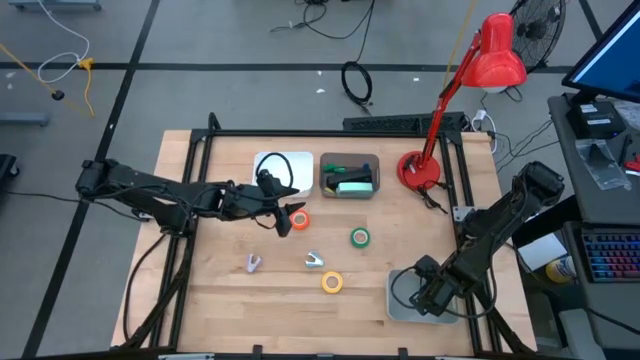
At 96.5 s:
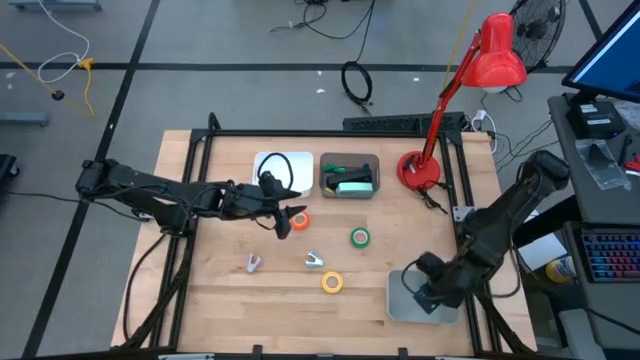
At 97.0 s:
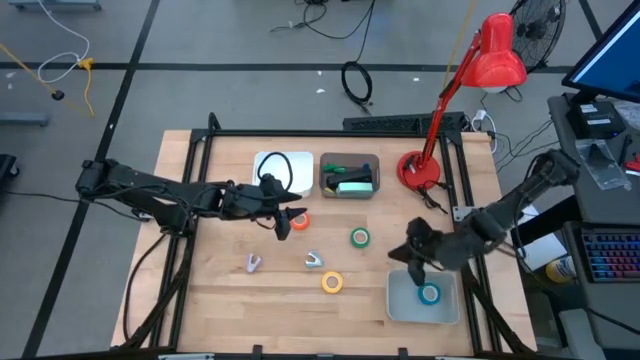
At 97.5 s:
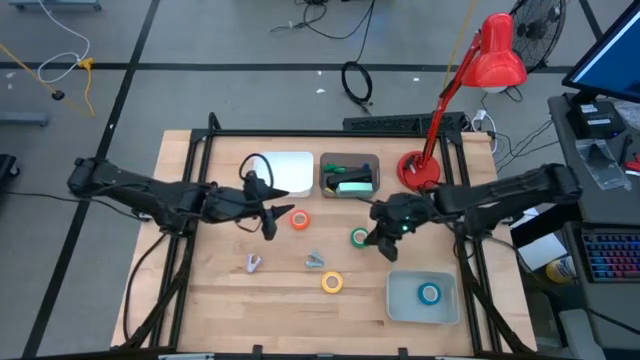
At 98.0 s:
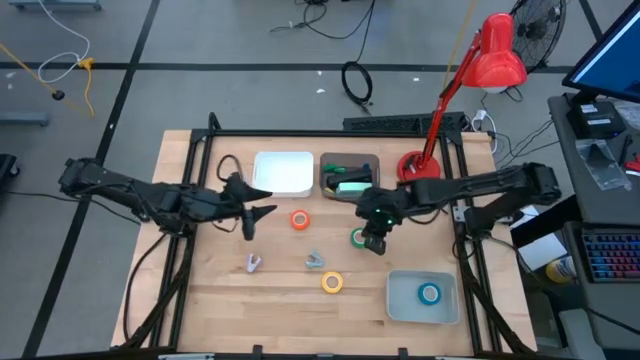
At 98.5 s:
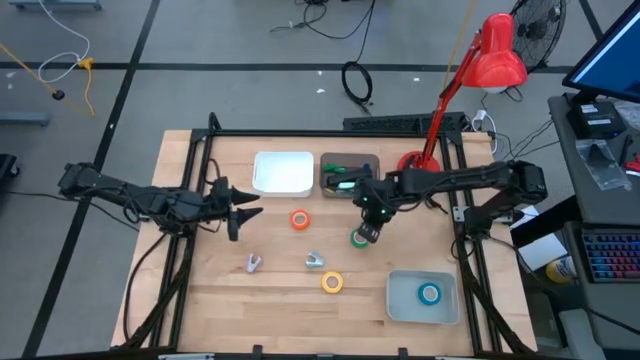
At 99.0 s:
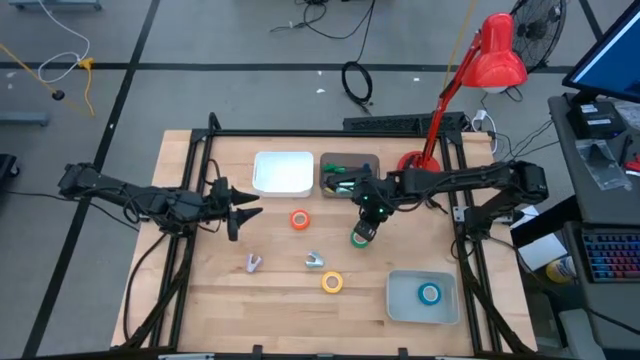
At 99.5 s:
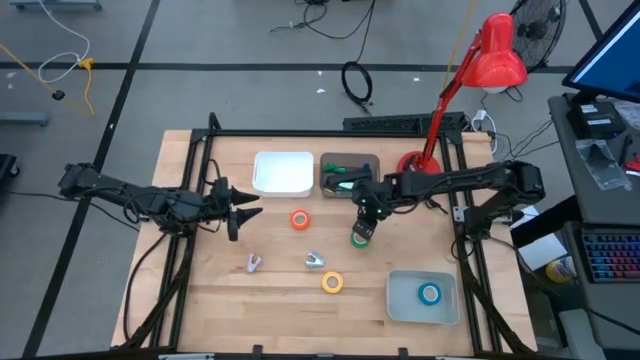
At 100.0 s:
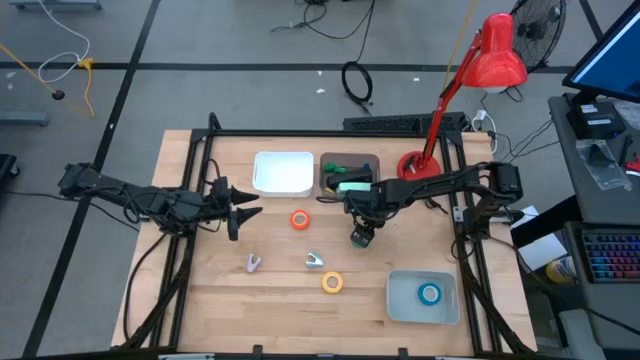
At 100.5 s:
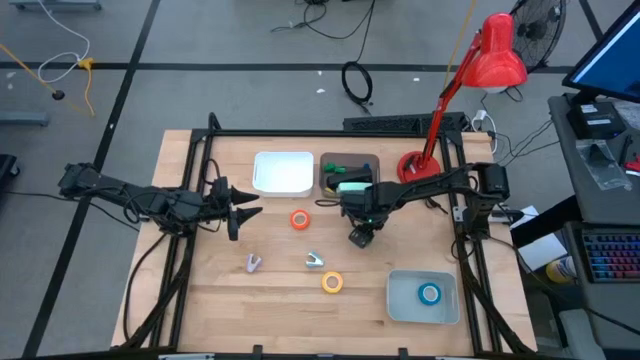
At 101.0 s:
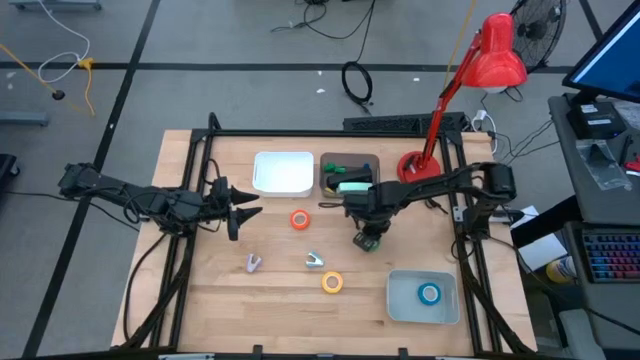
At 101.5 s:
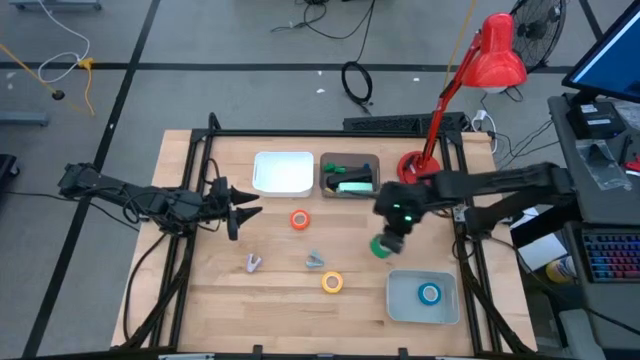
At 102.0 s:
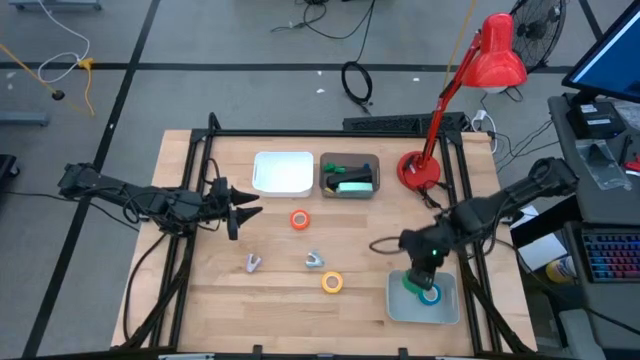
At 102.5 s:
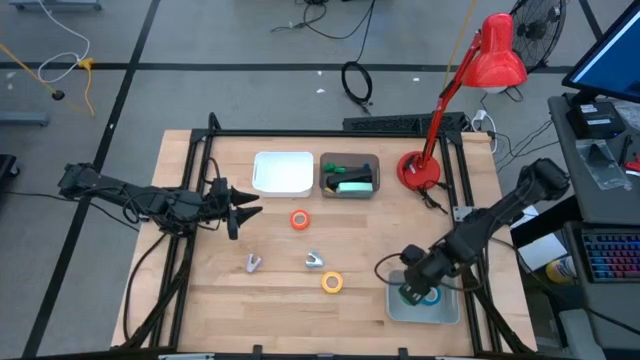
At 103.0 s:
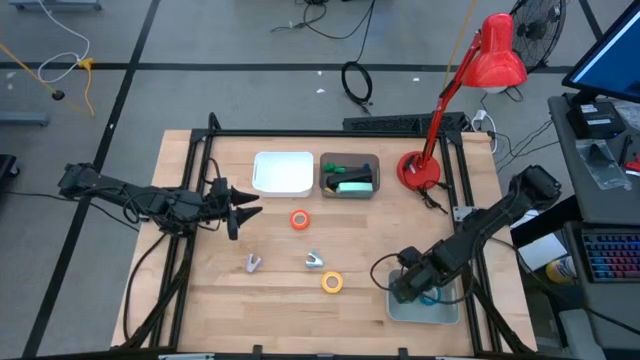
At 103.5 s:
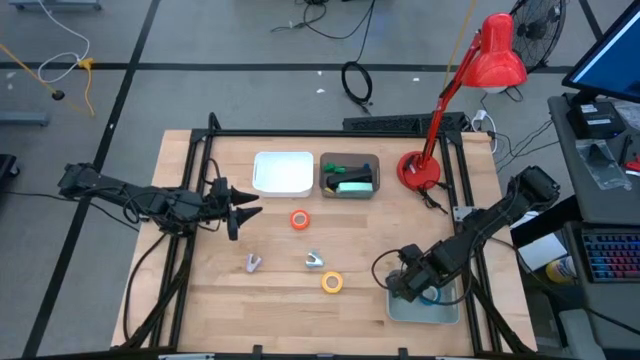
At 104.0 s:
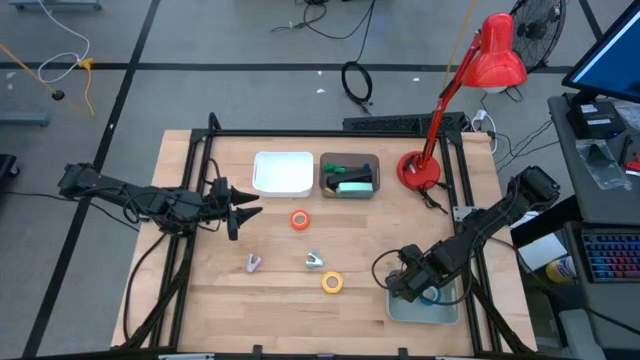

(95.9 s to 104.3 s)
Task: Pick and place Stapler, Stapler remover, tape
Put the green tape into the gray bin

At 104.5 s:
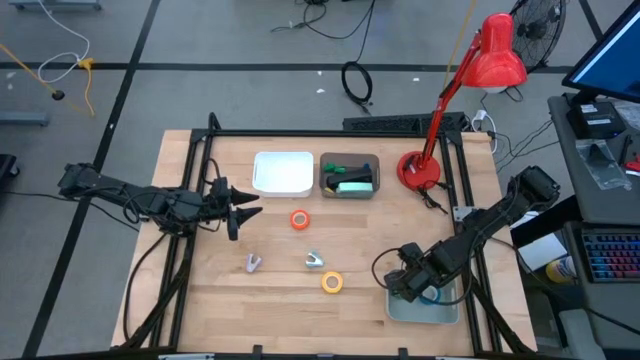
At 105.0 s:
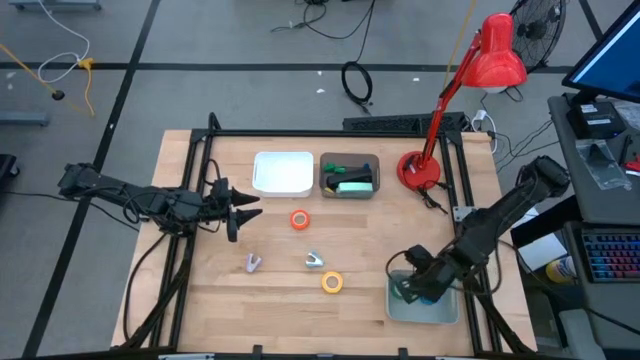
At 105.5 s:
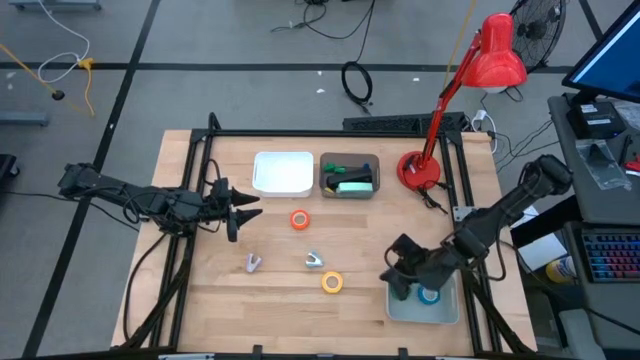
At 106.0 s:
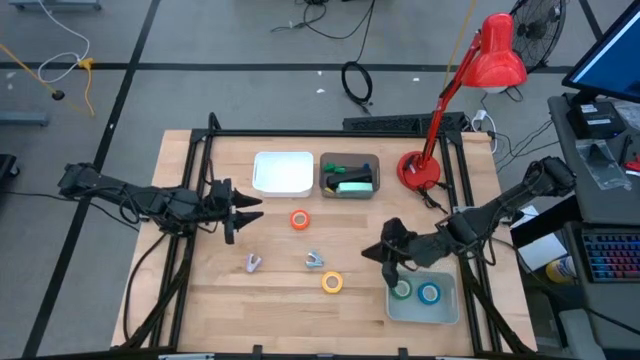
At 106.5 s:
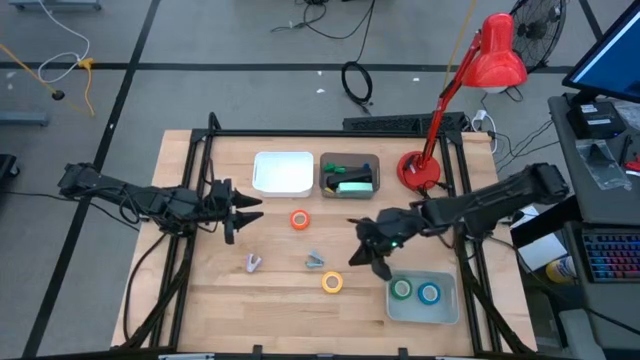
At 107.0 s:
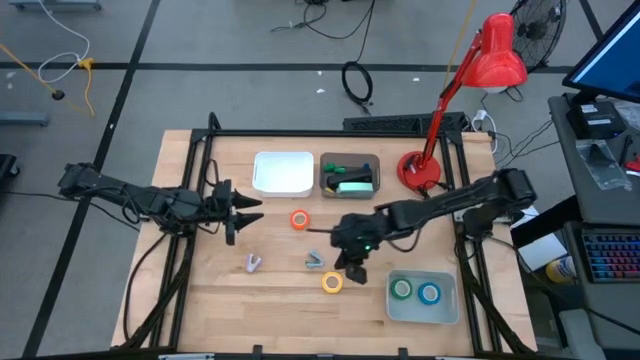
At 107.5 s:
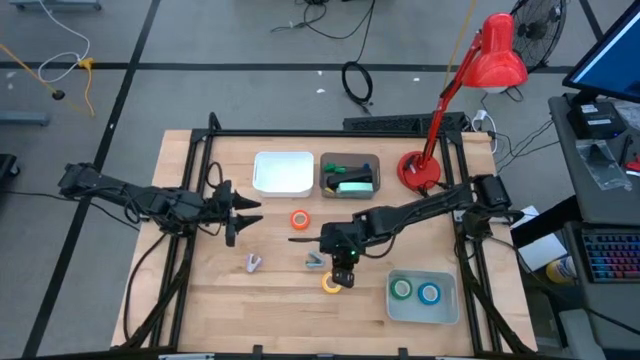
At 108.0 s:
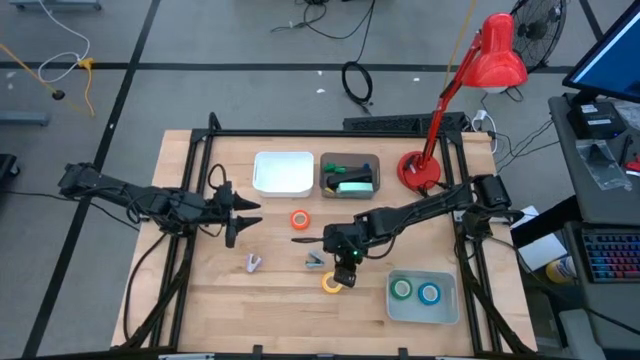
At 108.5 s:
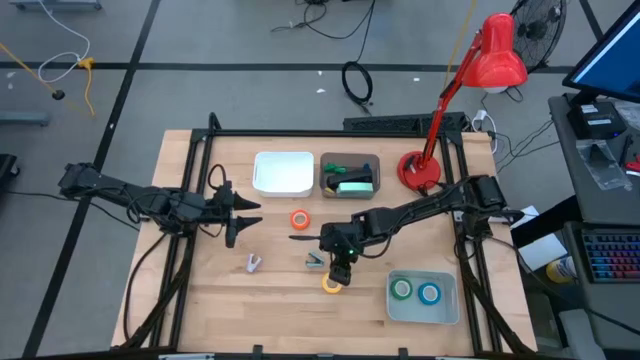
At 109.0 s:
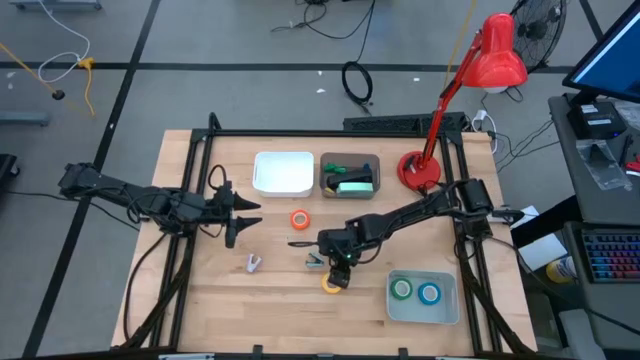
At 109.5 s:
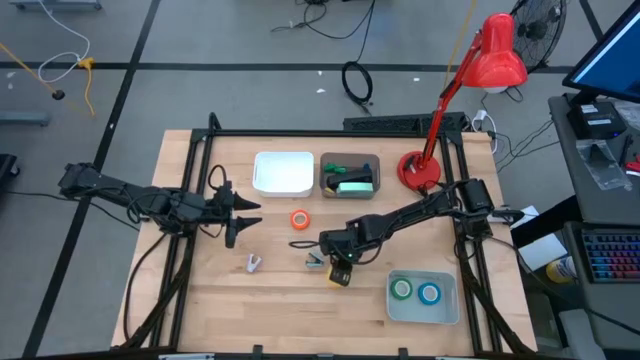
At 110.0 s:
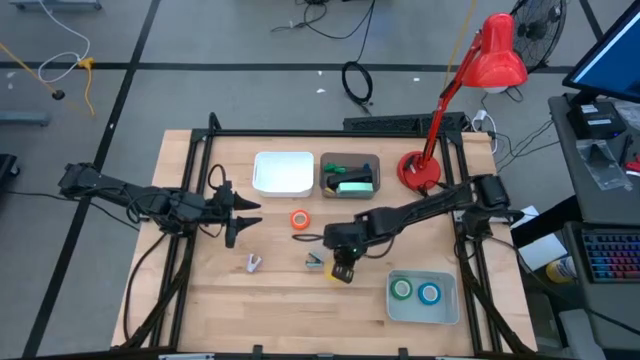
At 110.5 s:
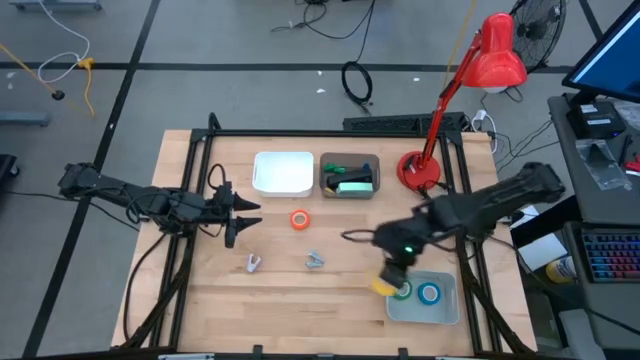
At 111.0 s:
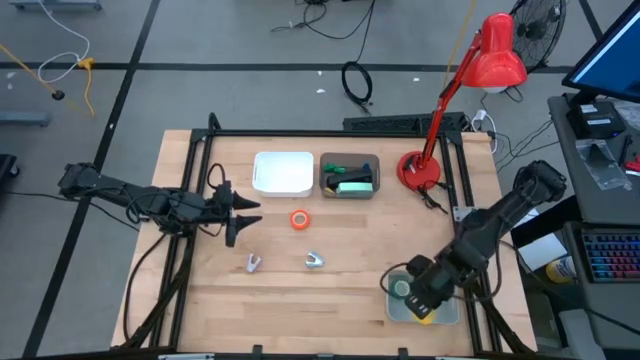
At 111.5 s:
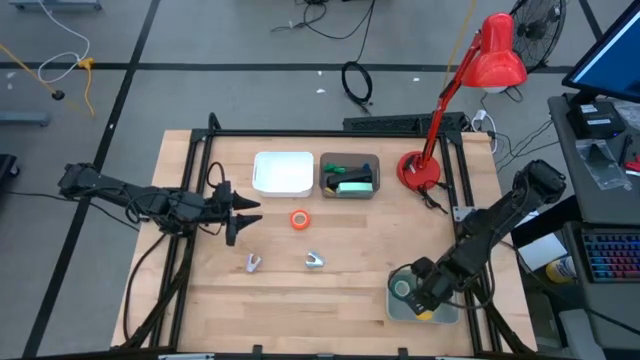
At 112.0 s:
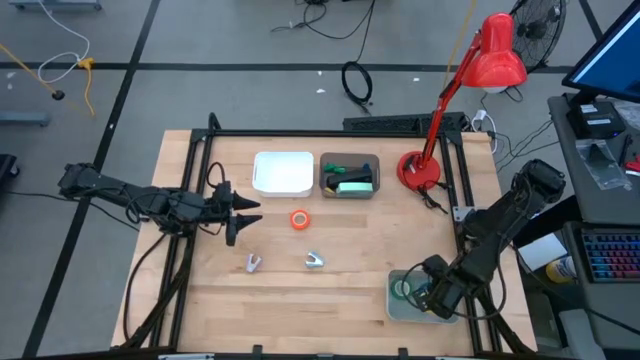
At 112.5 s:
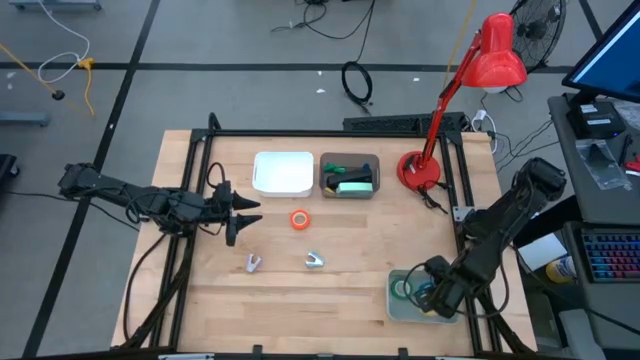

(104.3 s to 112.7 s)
Put the yellow tape into the gray bin

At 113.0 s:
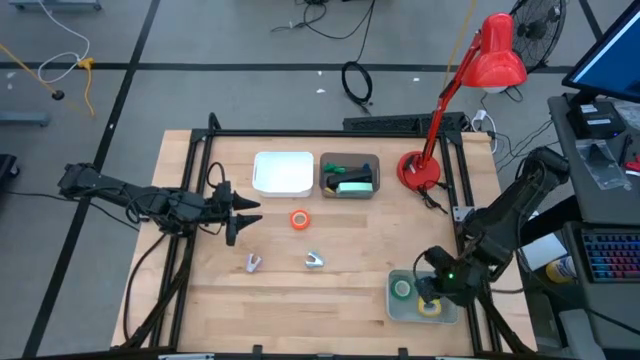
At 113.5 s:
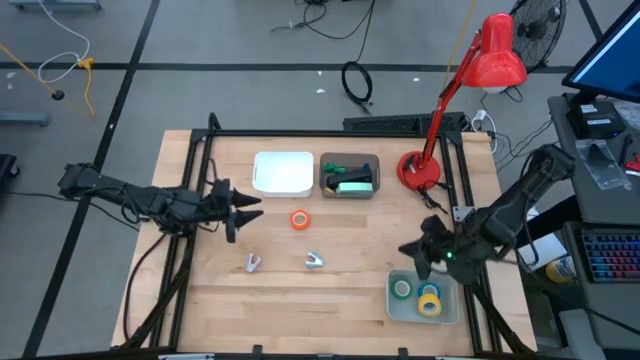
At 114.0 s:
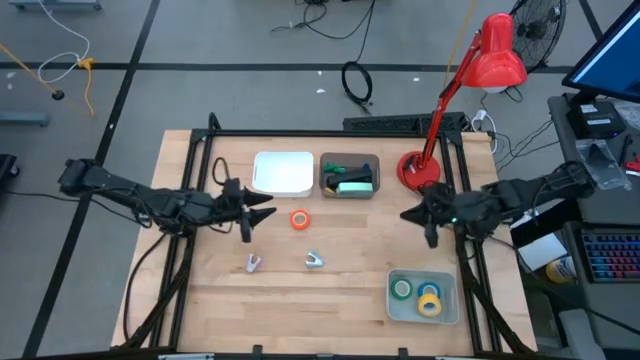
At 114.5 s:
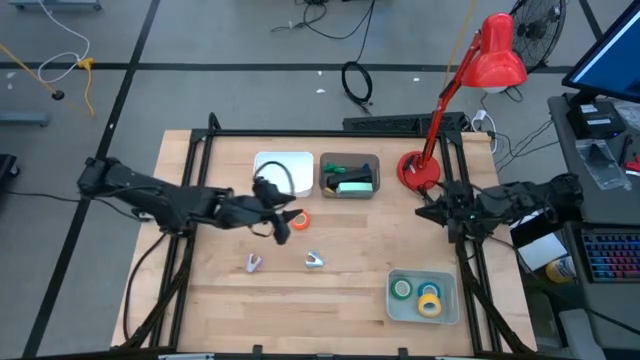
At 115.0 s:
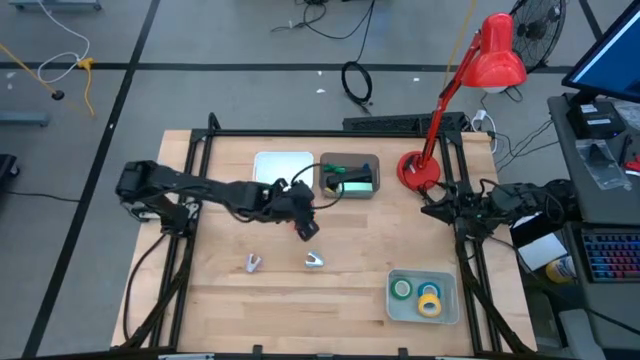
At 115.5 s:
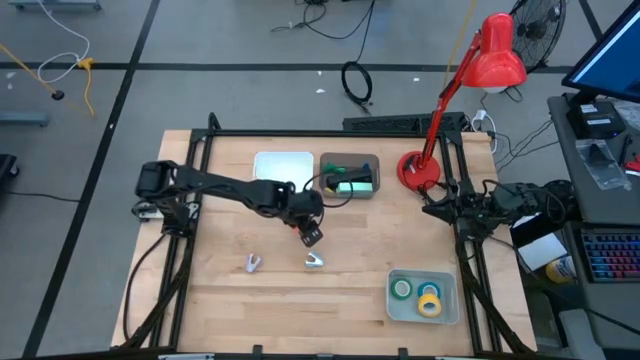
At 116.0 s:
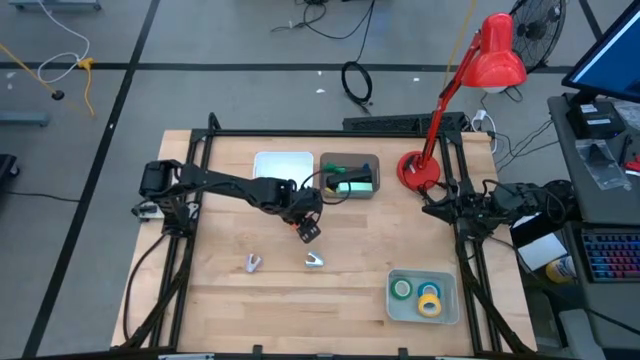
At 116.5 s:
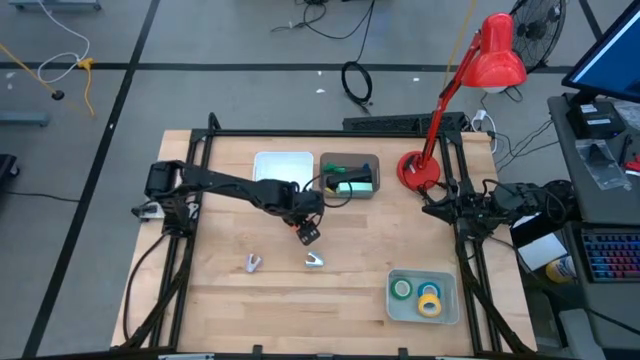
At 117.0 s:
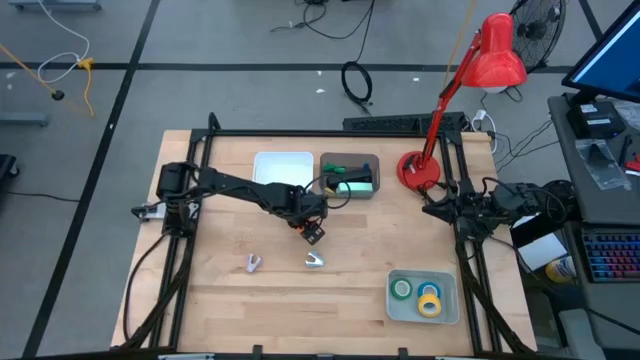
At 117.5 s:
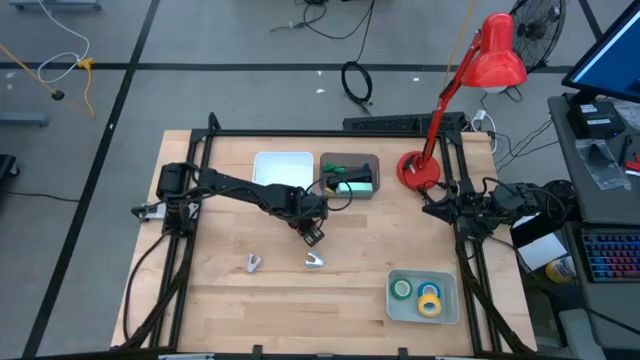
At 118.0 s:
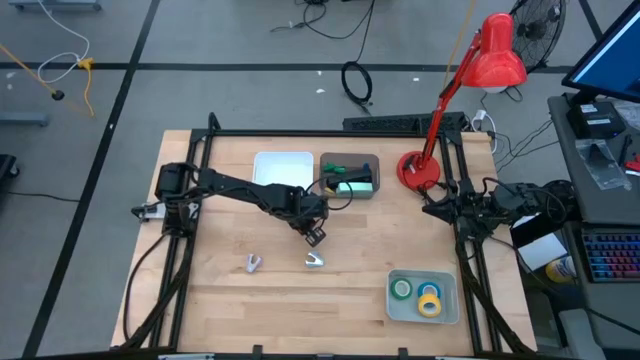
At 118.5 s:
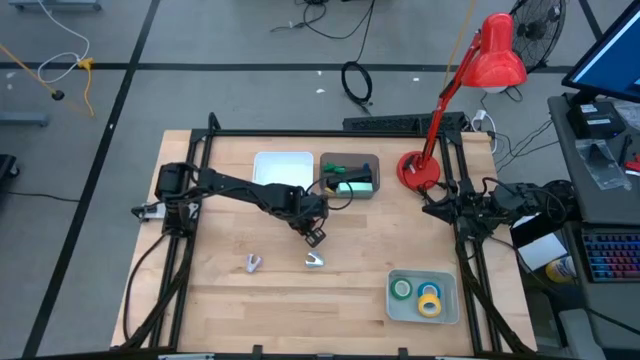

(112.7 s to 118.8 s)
Put the orange tape into the gray bin
